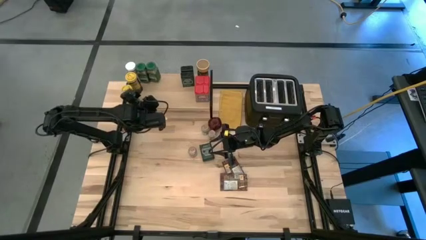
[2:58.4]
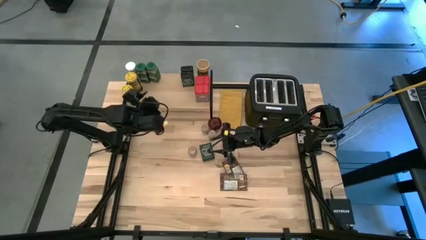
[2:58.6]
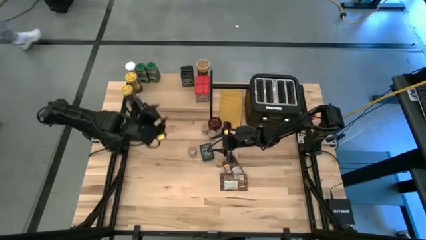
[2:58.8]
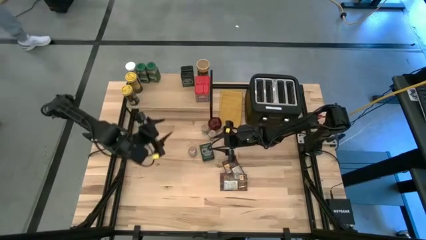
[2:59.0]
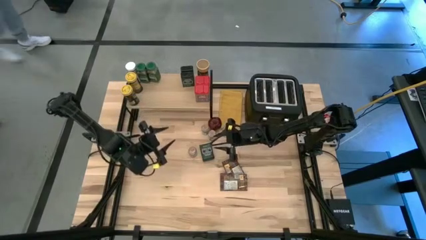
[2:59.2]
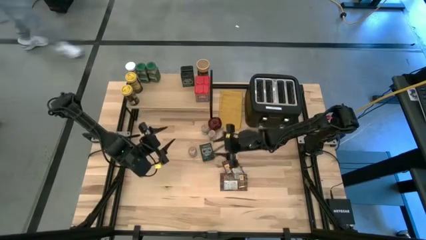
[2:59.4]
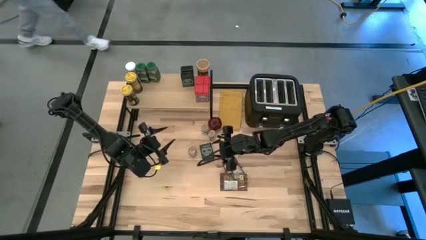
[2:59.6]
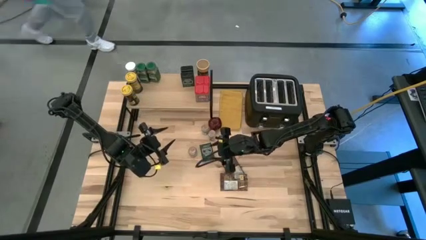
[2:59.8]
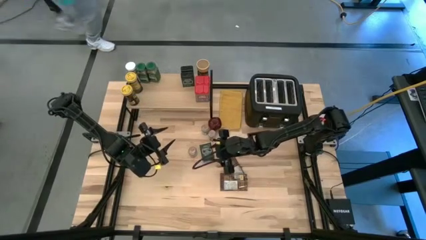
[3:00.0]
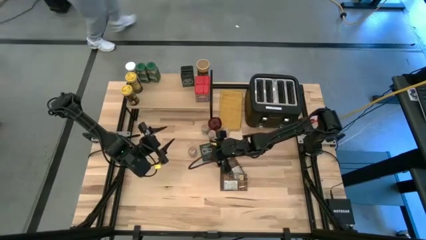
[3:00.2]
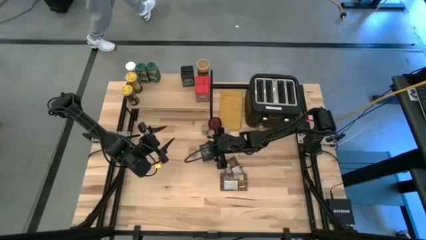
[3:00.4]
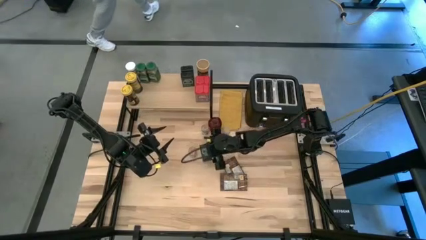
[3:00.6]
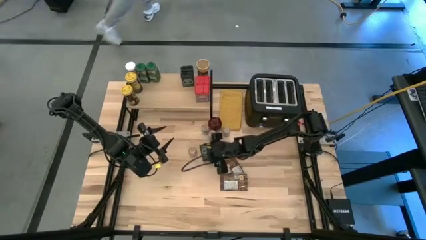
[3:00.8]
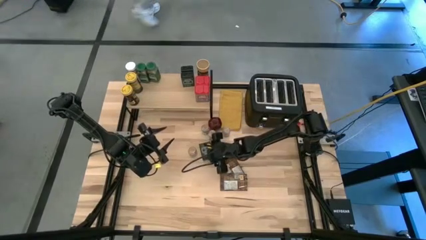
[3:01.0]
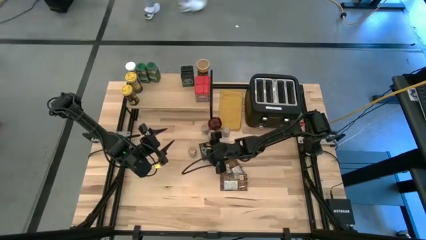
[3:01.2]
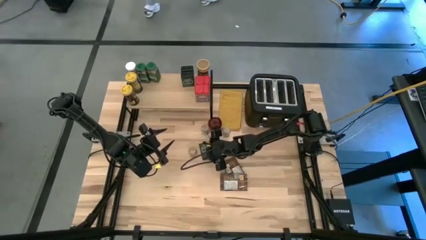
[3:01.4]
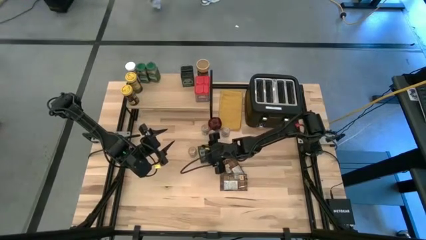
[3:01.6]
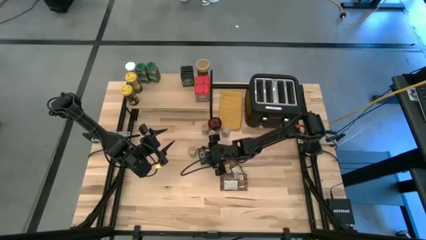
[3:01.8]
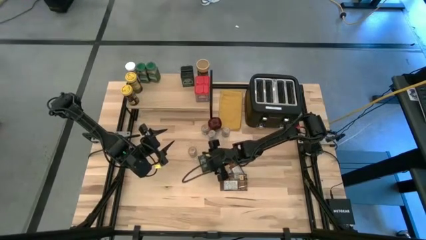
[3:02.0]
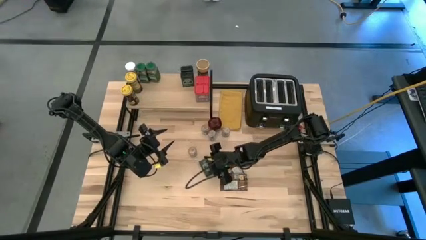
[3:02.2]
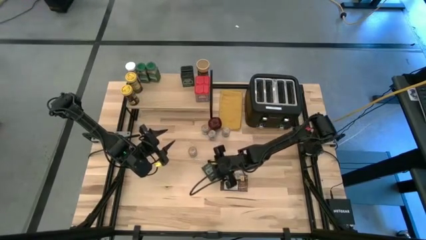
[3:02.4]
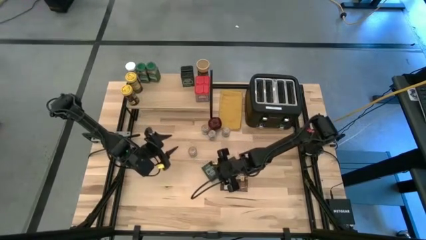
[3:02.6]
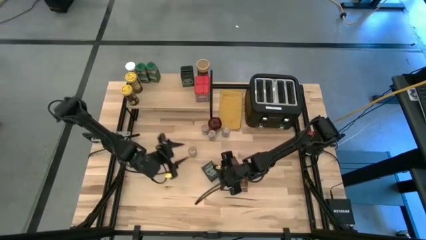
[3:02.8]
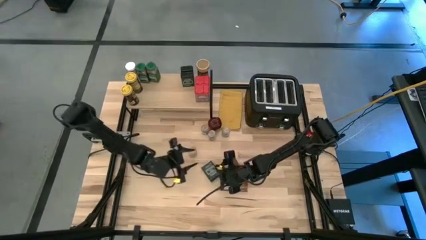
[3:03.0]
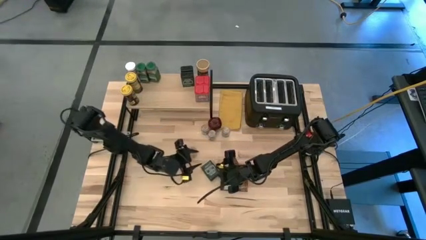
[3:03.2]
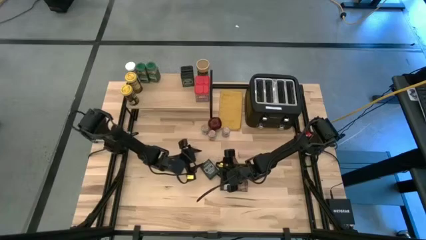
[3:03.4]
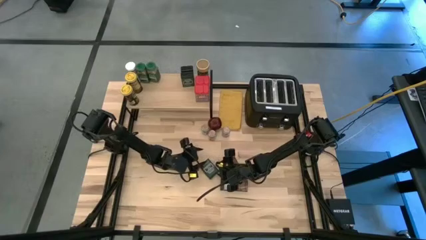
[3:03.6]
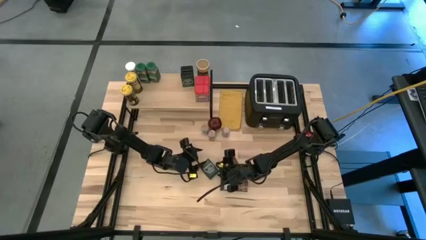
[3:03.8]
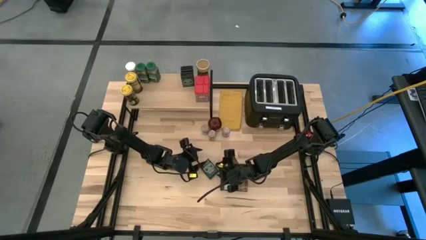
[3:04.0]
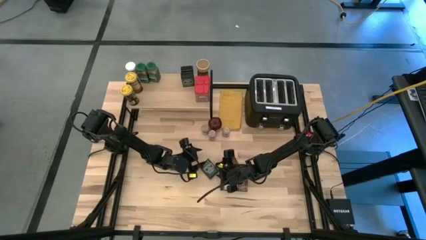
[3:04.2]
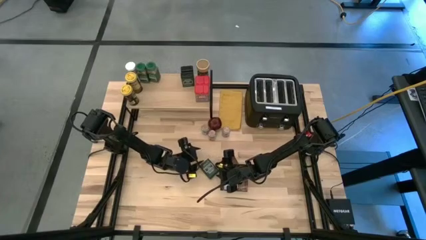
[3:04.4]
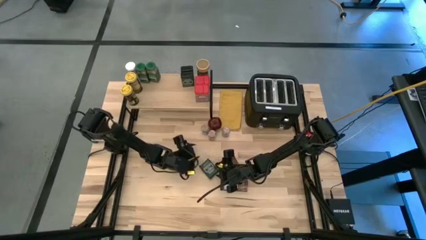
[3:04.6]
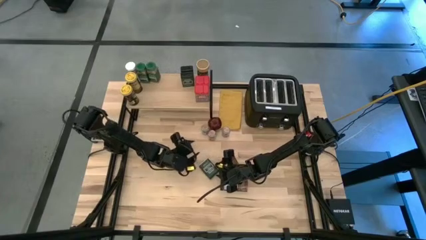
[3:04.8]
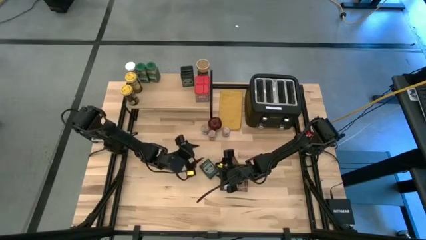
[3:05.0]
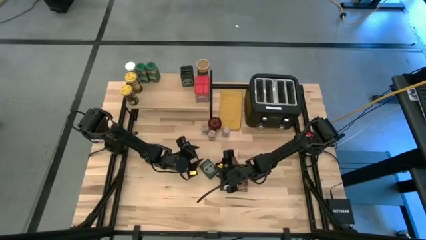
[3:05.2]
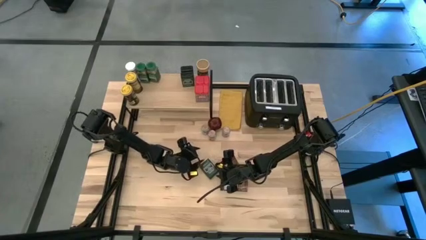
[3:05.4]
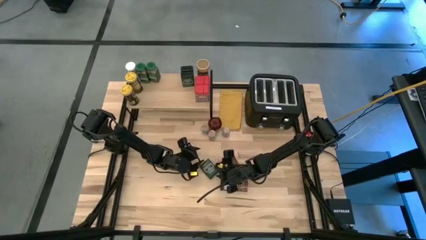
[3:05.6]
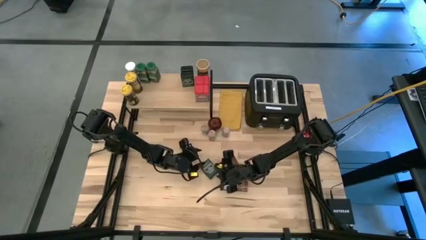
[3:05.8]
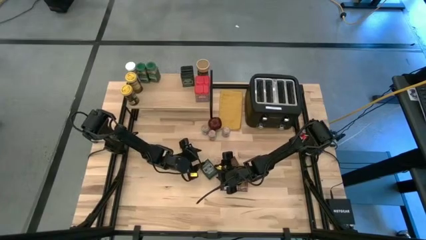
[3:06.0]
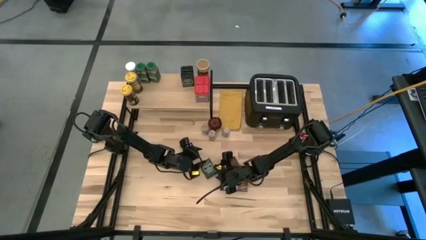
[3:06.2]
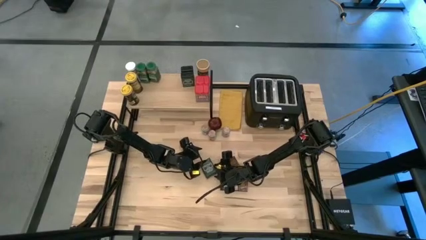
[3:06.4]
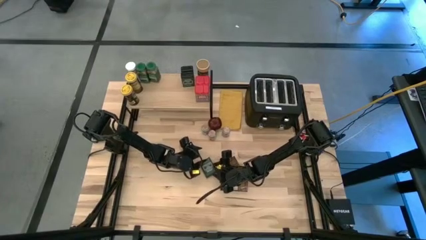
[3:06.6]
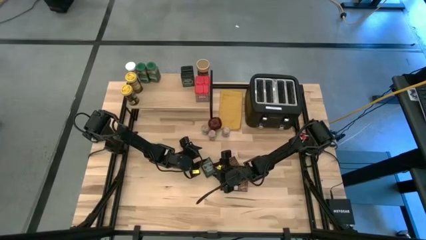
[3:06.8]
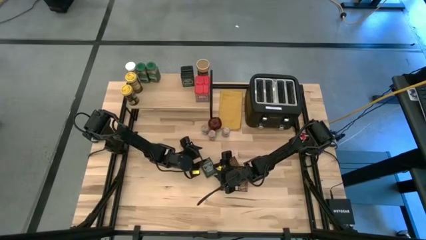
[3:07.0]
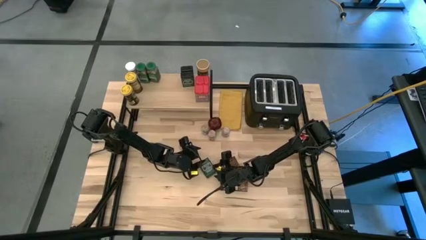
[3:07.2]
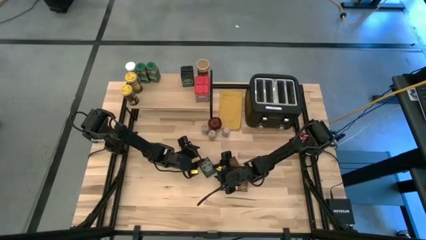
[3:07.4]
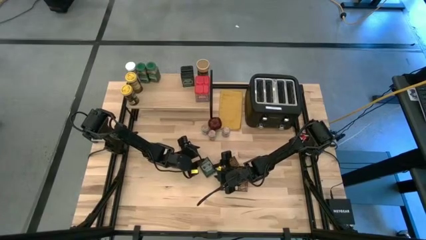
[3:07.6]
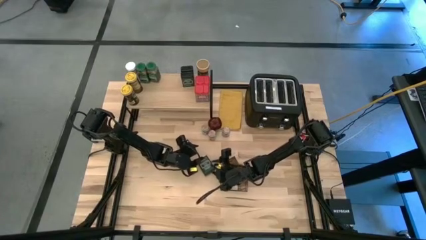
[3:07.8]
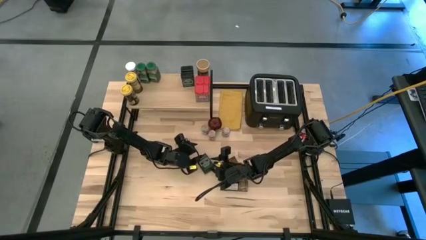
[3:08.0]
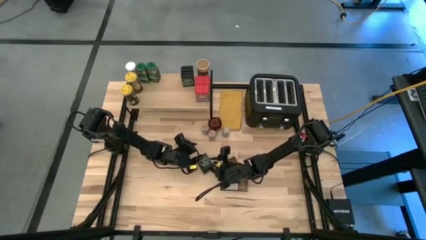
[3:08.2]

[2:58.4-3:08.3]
Task: Shelf spices
Put the black seasoning can aligned with the other black seasoning cans on the shelf

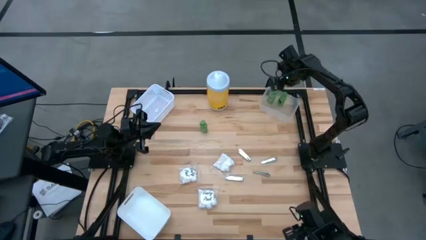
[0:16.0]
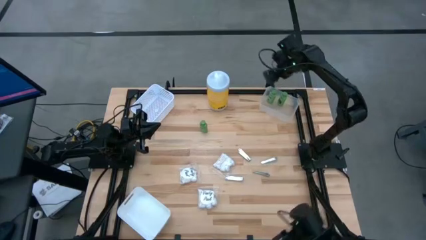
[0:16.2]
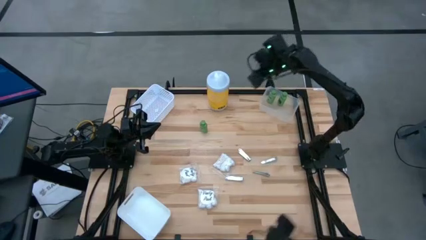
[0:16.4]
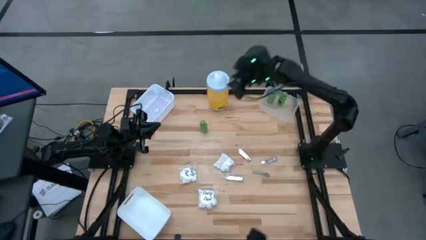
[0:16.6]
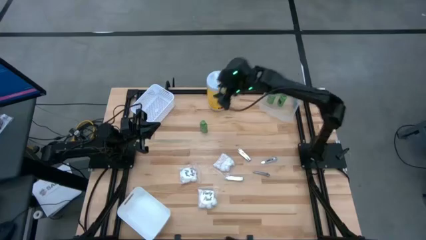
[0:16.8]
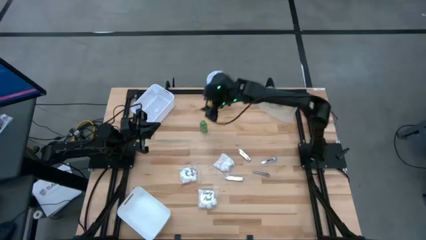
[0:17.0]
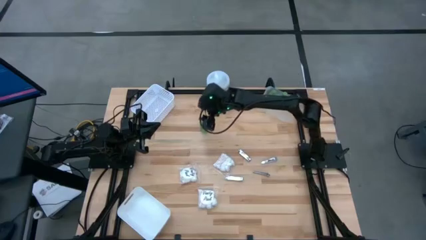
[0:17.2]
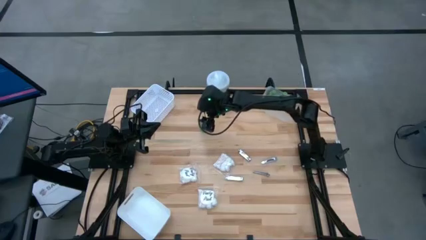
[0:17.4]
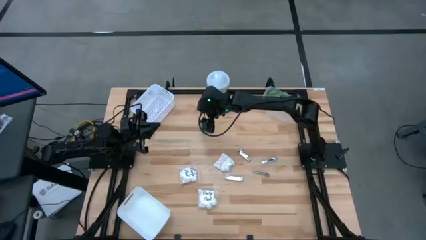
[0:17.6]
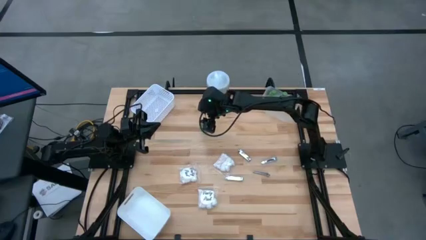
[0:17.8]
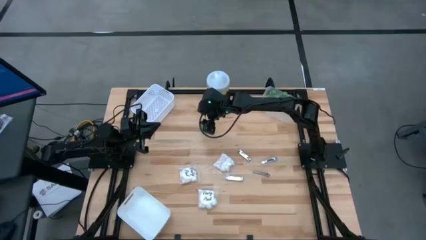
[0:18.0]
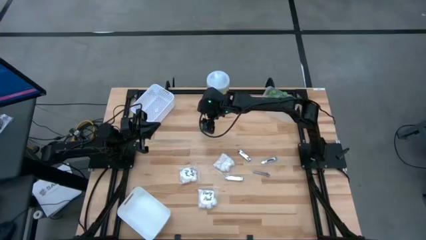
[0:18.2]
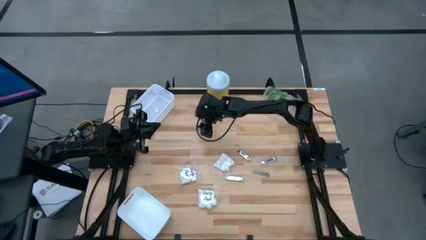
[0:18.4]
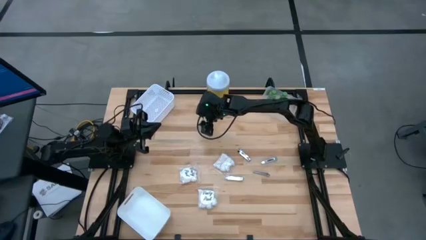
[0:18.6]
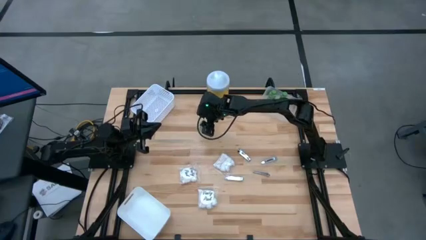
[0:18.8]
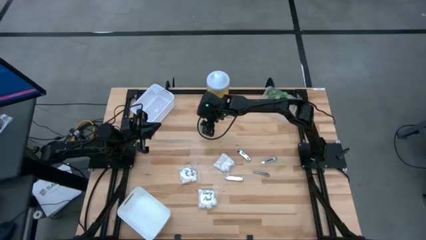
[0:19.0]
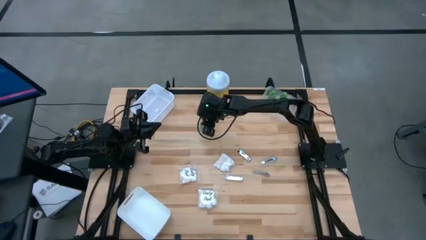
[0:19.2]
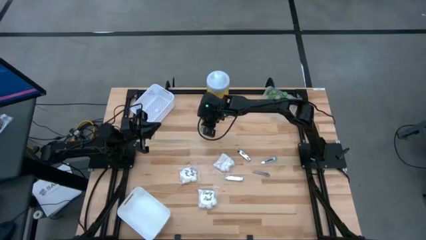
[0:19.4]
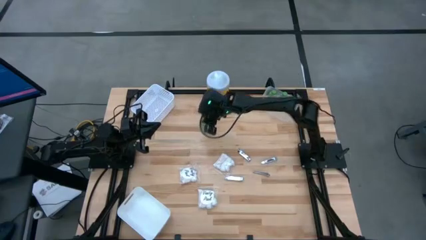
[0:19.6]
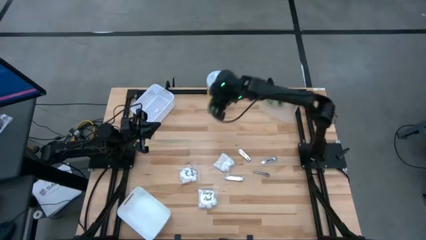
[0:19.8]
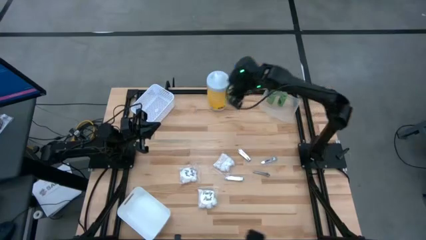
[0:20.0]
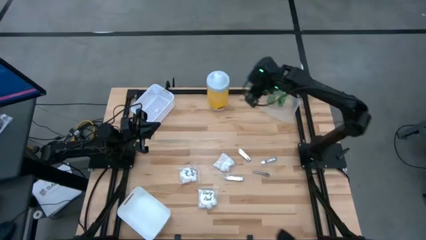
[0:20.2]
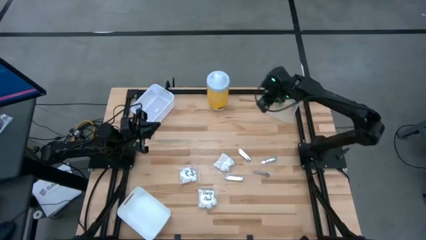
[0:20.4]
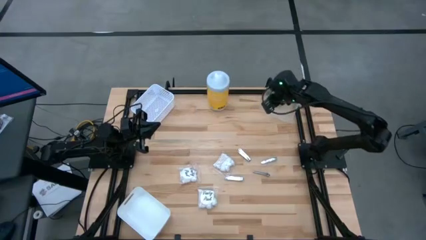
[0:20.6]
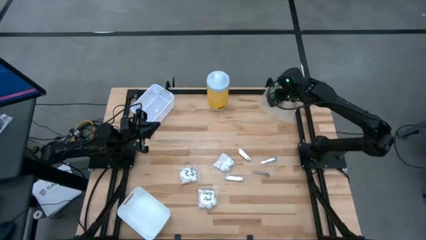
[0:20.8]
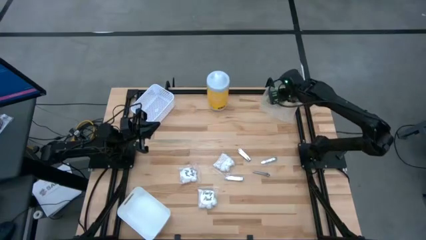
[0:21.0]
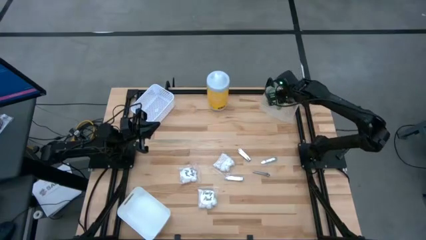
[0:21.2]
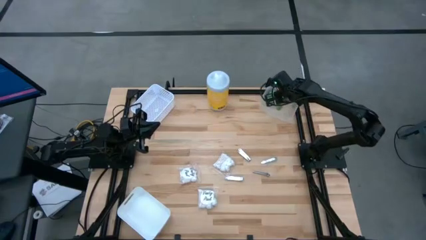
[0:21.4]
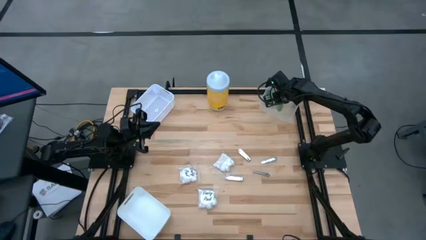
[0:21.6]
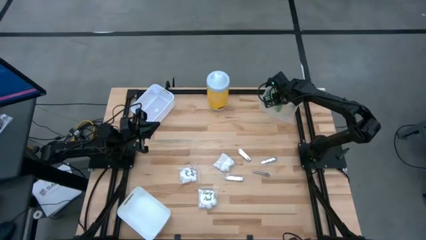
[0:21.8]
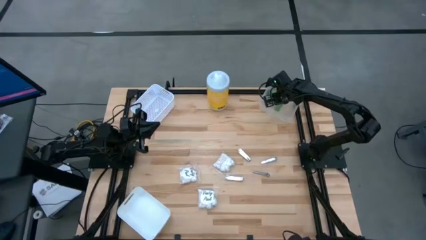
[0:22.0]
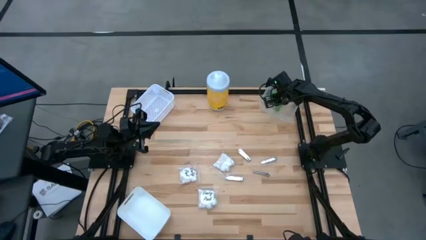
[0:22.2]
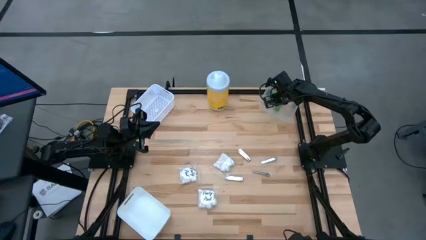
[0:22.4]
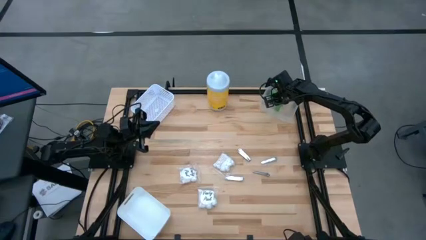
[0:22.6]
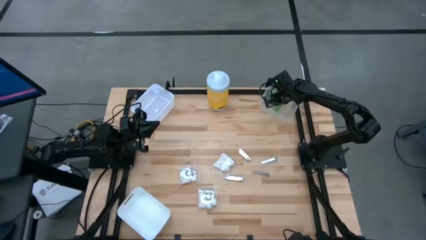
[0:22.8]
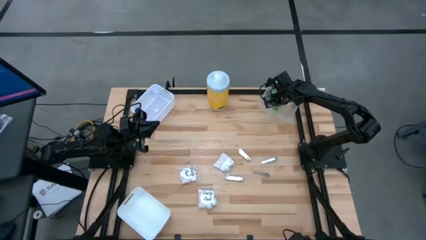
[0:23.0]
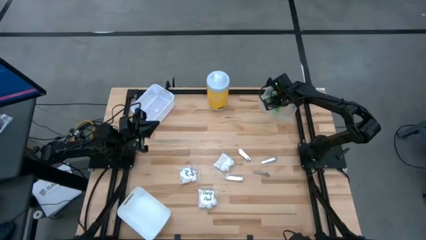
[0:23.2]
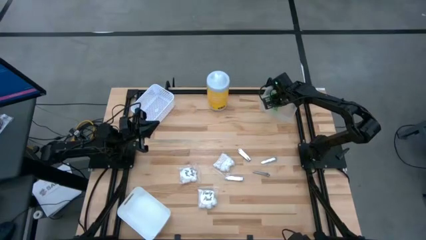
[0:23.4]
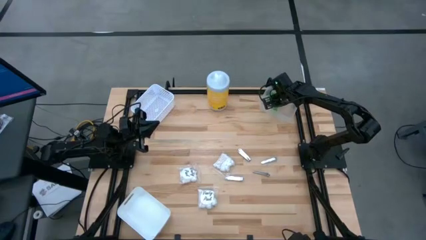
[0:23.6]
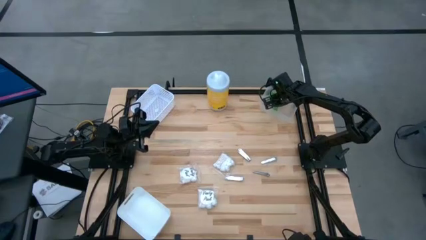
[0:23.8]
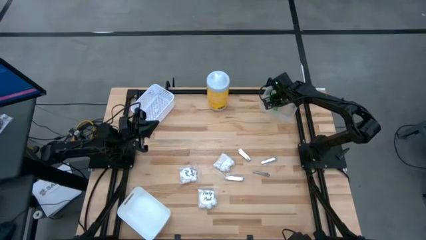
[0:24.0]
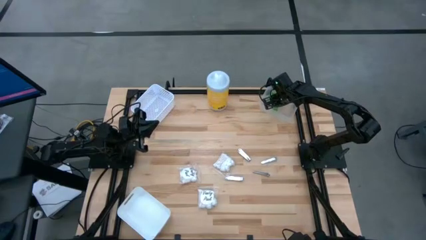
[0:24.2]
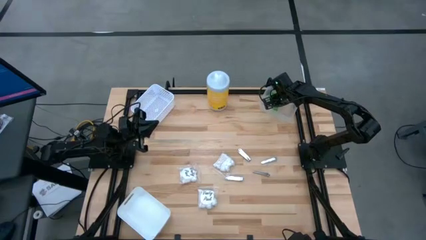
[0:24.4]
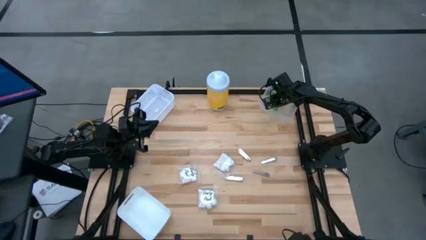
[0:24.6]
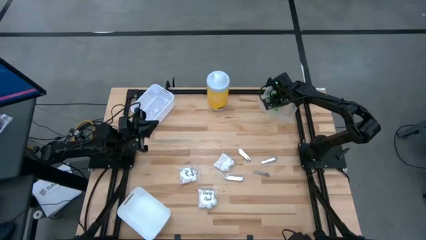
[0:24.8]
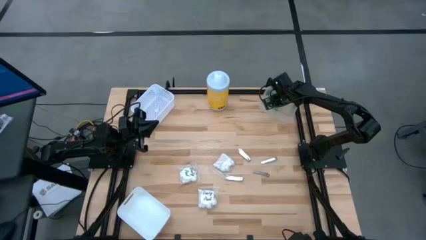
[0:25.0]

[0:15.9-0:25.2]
Task: Pick & Place Travel size toiletries
Put the green shampoo into the transparent bin
